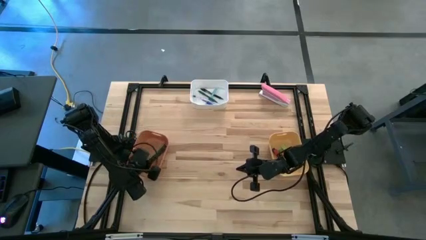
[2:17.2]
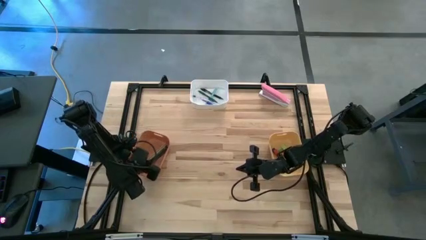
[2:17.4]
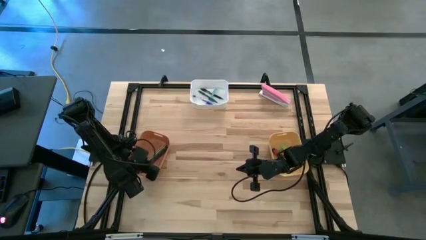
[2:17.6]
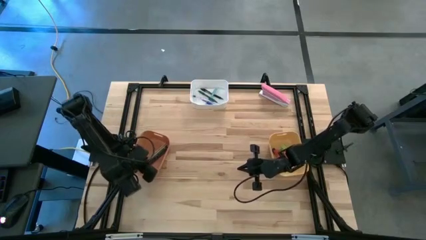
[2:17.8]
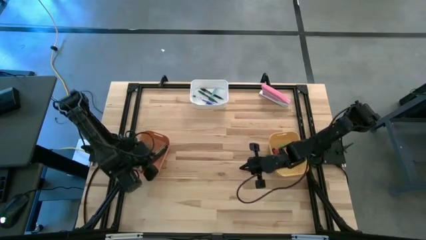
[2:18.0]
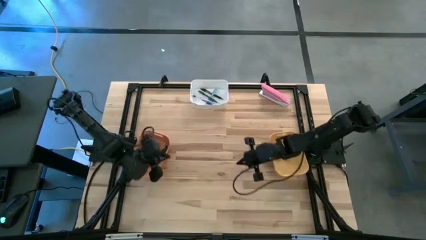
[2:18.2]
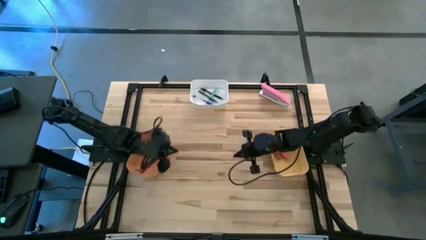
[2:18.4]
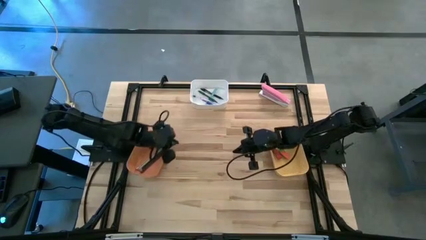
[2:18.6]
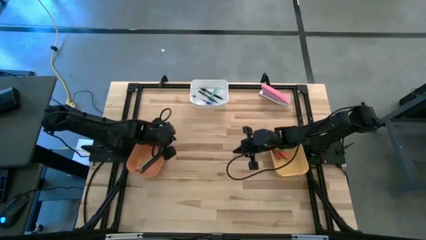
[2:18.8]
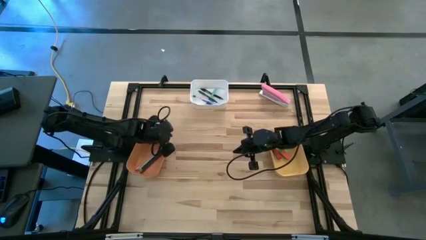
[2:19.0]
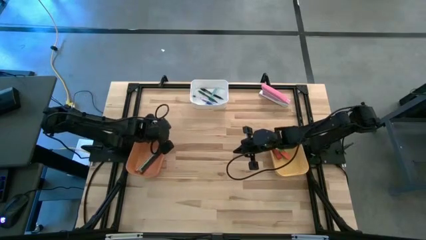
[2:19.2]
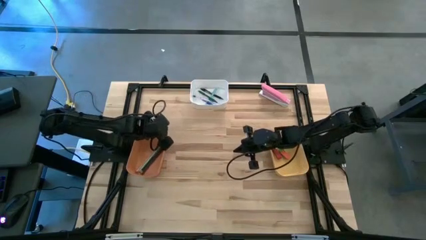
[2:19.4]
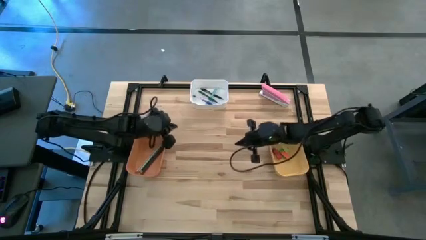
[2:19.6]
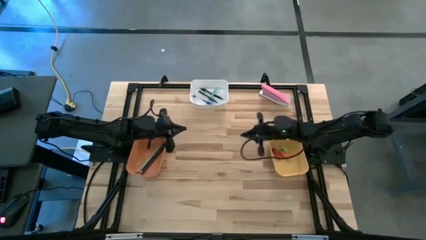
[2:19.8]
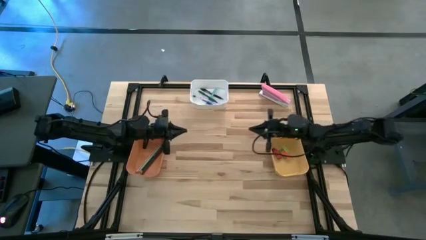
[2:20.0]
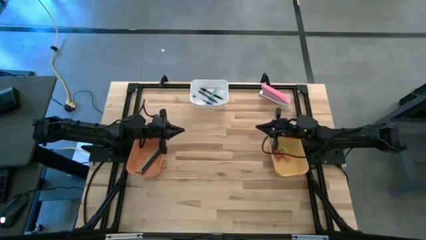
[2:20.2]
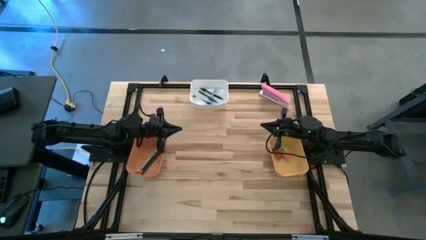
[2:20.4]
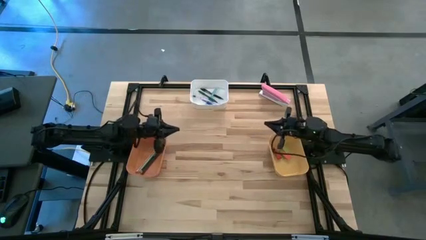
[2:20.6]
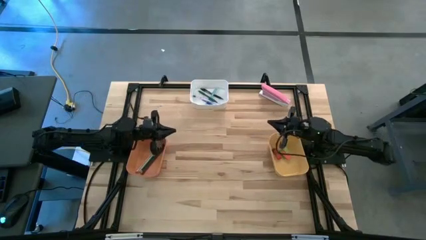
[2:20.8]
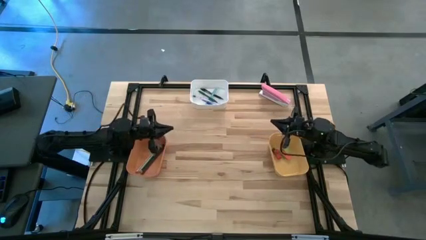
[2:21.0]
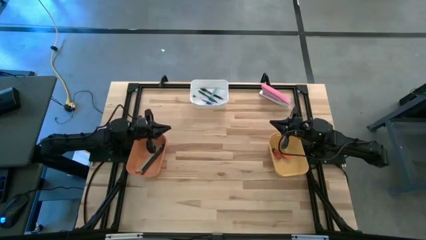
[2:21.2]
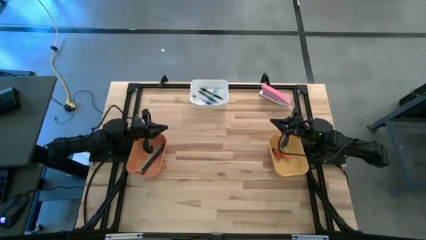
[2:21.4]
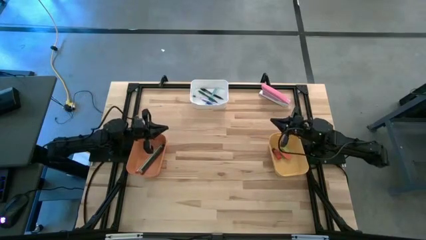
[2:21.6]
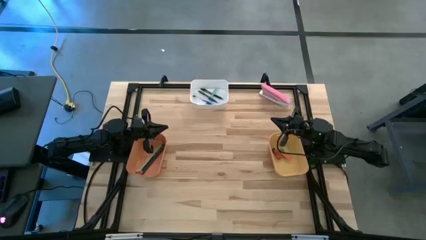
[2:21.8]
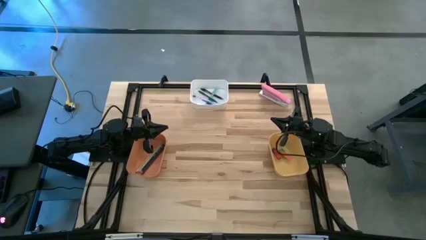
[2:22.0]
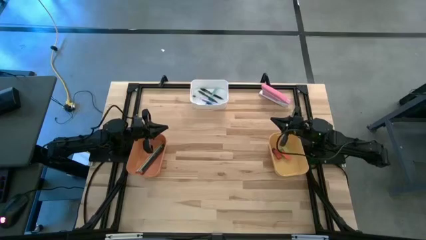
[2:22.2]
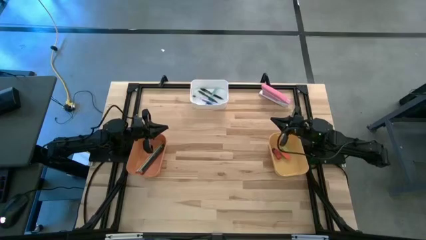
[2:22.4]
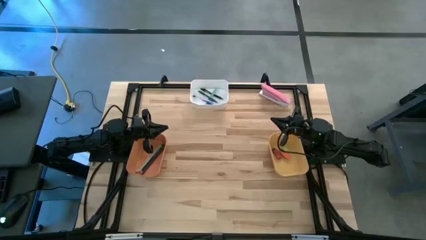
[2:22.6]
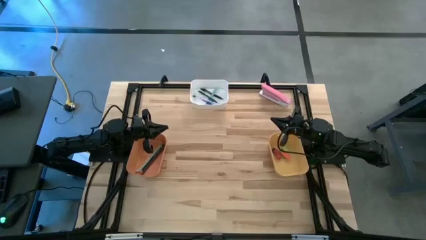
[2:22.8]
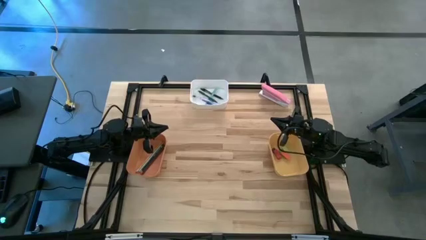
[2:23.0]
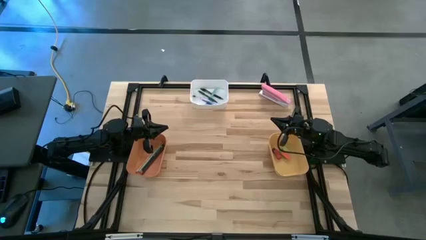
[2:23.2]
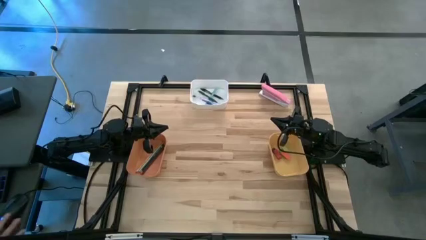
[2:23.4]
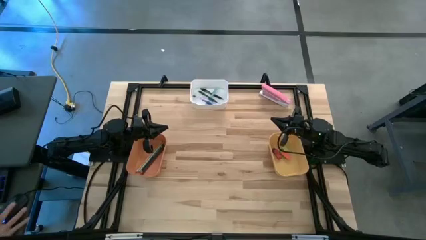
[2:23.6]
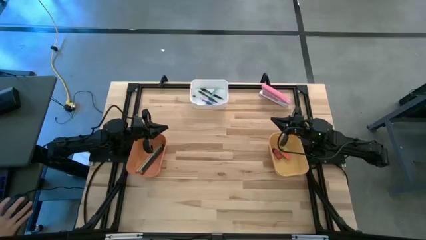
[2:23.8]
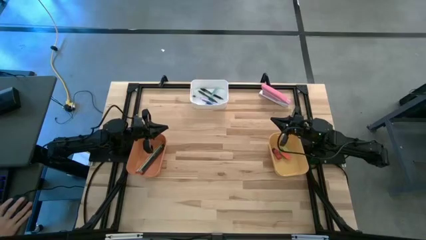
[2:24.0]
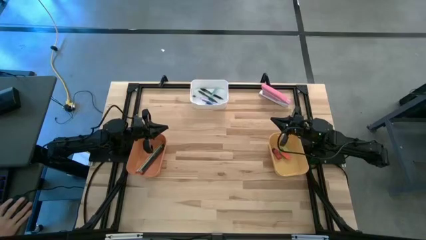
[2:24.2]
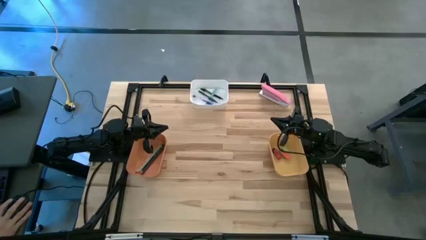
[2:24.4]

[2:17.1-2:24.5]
Task: Sort crayons/erasers/pens/pencils in bins
Return to Home Position

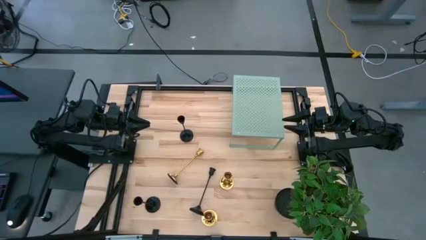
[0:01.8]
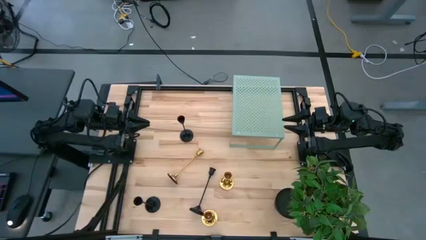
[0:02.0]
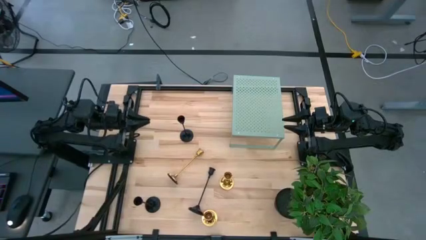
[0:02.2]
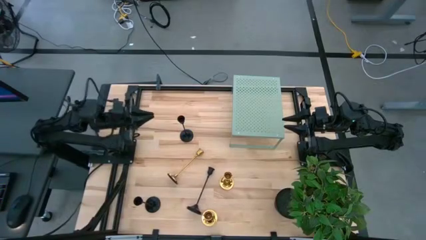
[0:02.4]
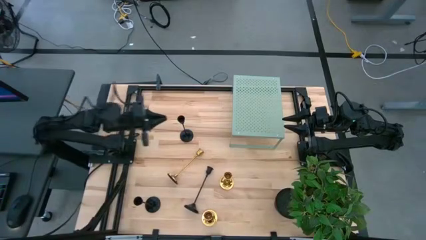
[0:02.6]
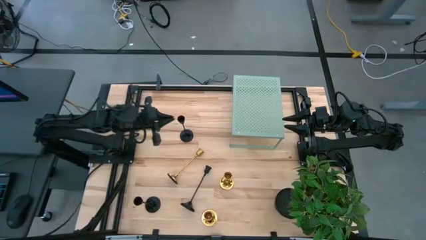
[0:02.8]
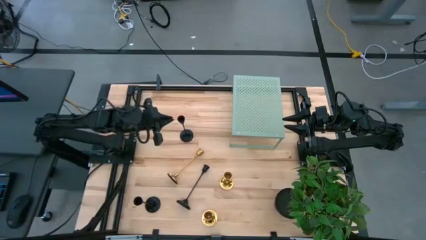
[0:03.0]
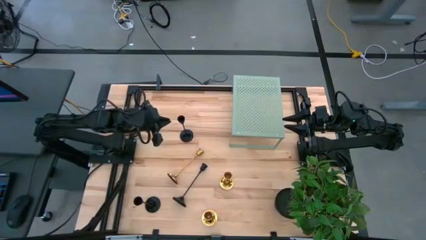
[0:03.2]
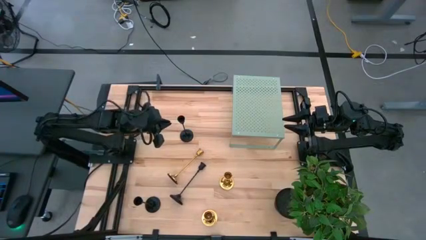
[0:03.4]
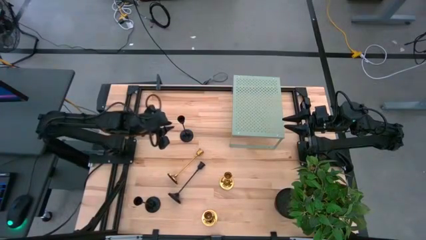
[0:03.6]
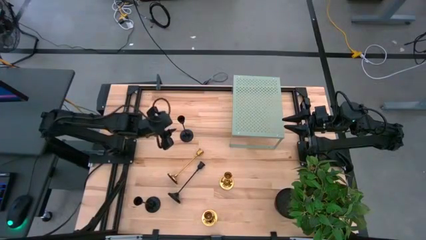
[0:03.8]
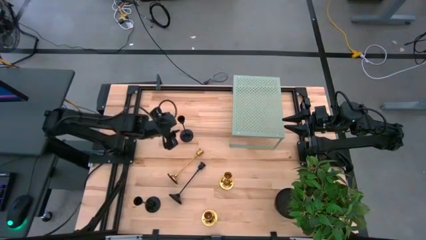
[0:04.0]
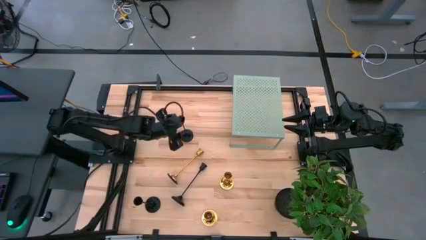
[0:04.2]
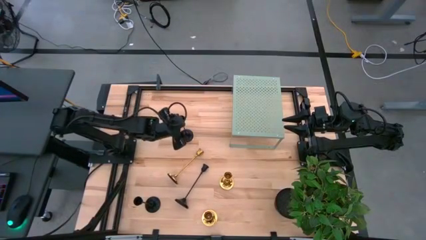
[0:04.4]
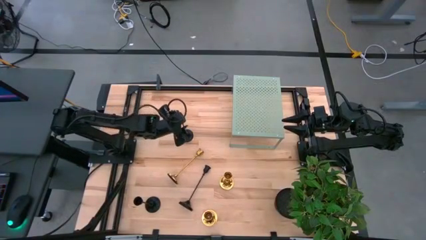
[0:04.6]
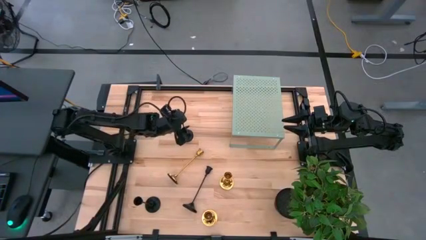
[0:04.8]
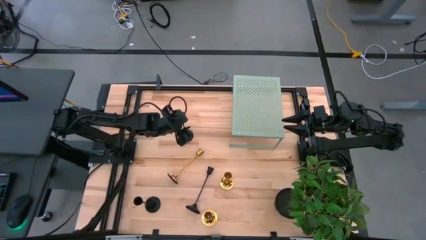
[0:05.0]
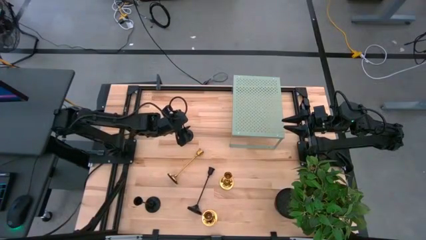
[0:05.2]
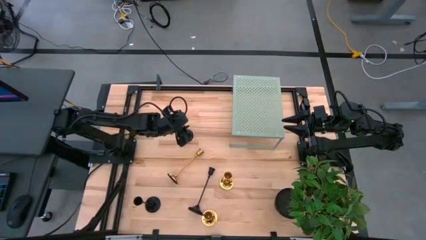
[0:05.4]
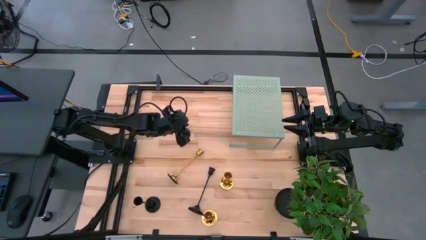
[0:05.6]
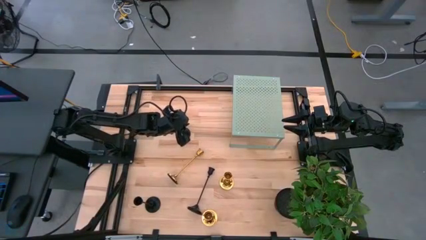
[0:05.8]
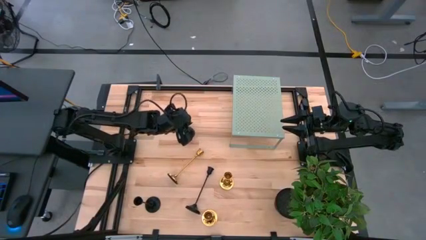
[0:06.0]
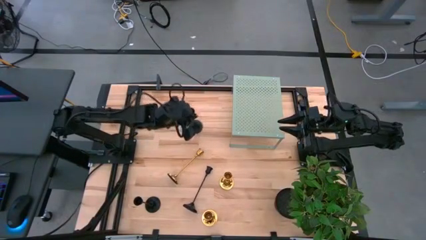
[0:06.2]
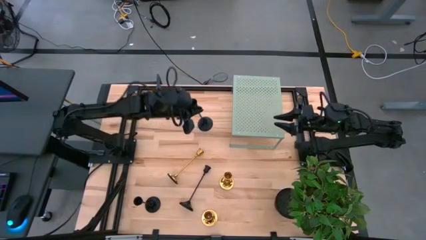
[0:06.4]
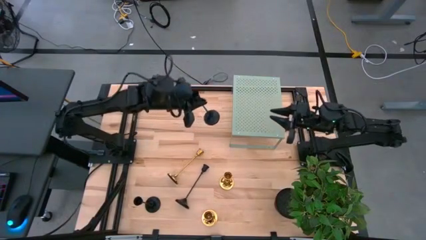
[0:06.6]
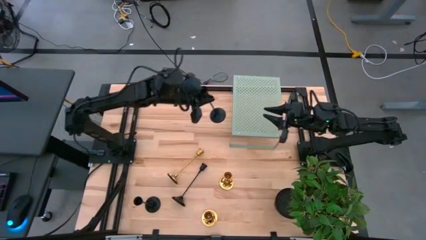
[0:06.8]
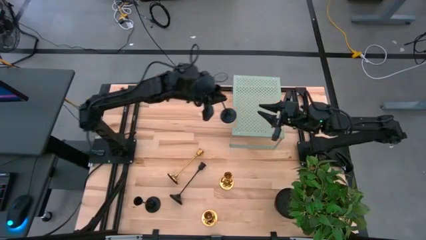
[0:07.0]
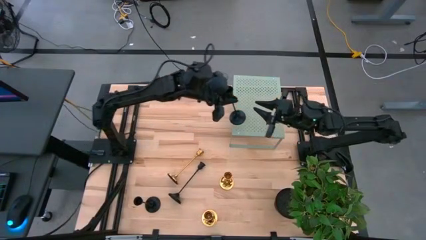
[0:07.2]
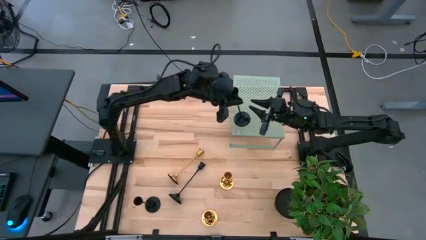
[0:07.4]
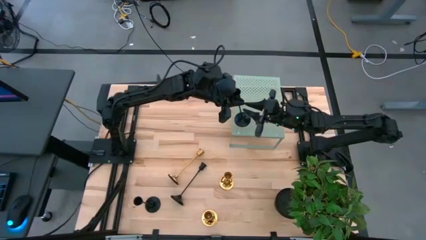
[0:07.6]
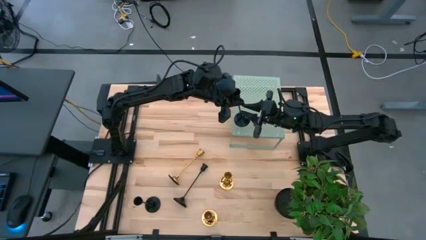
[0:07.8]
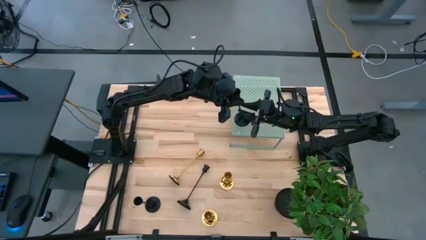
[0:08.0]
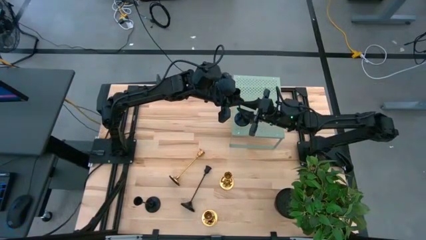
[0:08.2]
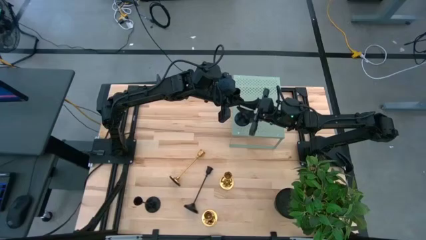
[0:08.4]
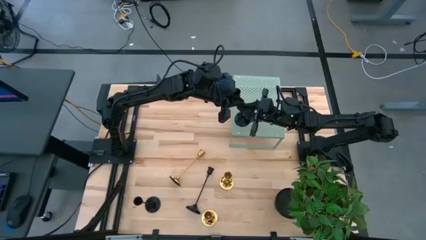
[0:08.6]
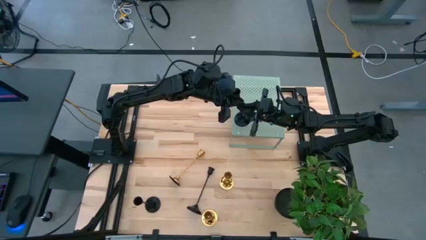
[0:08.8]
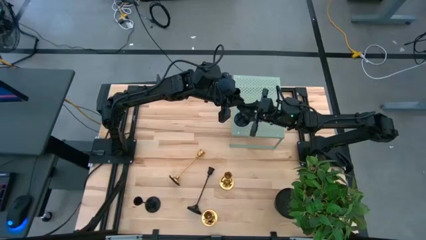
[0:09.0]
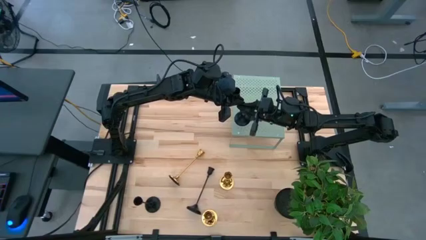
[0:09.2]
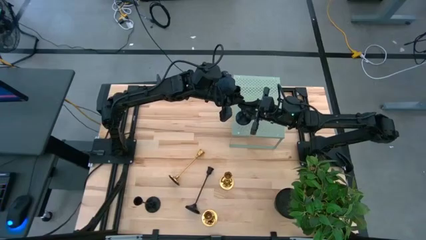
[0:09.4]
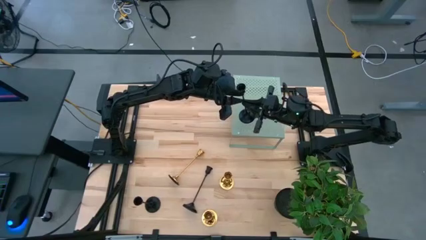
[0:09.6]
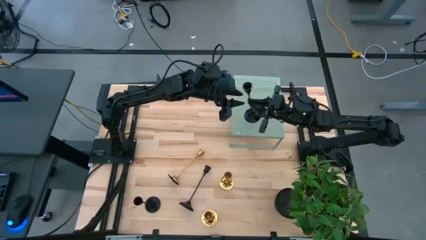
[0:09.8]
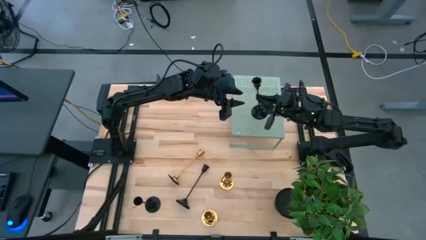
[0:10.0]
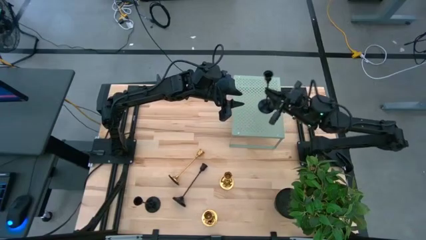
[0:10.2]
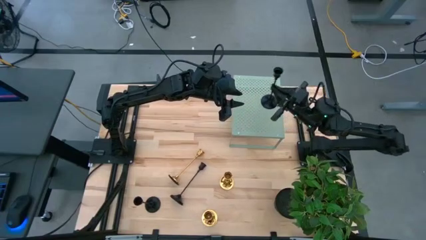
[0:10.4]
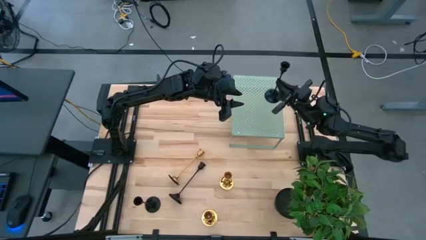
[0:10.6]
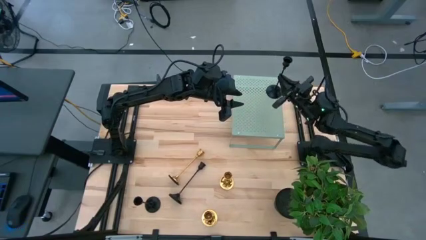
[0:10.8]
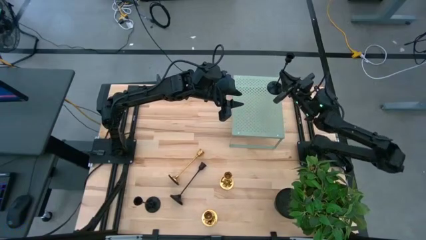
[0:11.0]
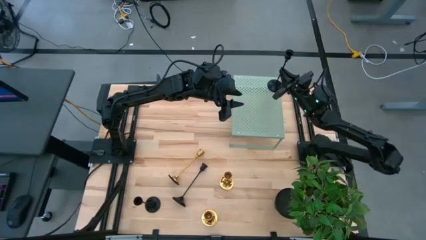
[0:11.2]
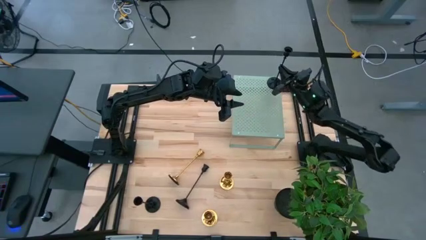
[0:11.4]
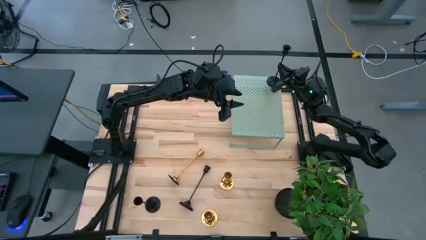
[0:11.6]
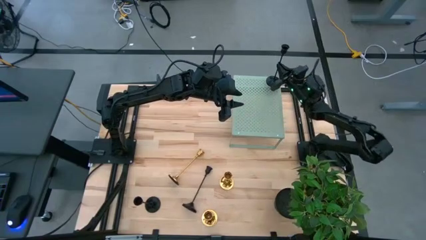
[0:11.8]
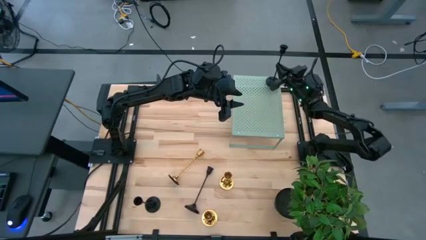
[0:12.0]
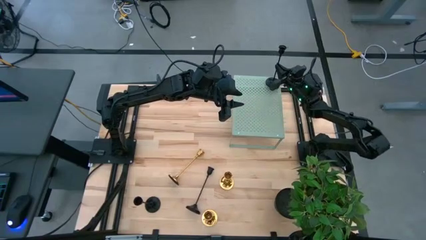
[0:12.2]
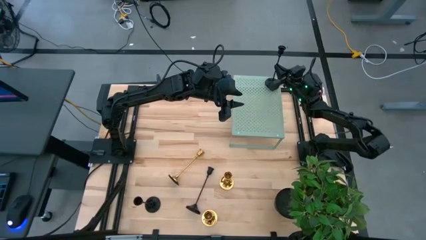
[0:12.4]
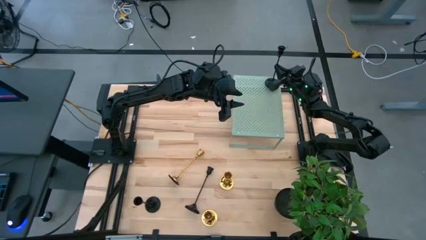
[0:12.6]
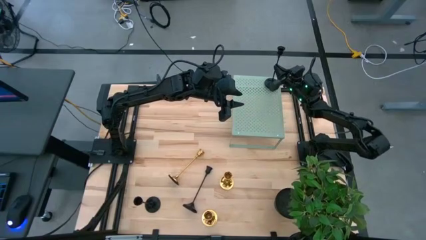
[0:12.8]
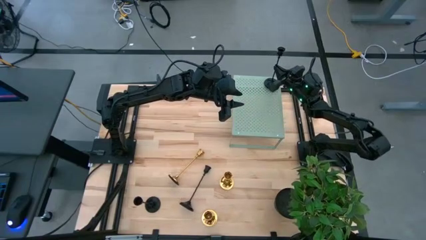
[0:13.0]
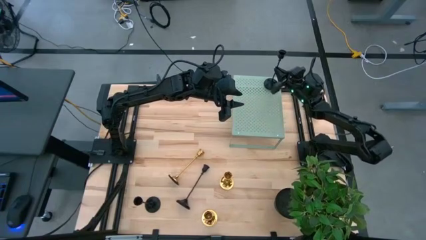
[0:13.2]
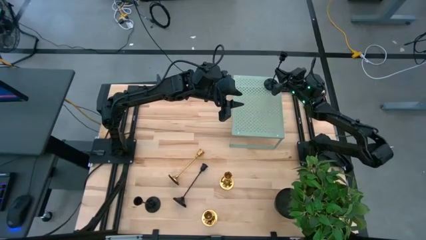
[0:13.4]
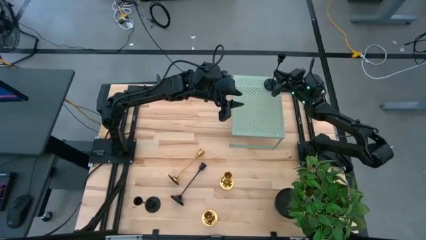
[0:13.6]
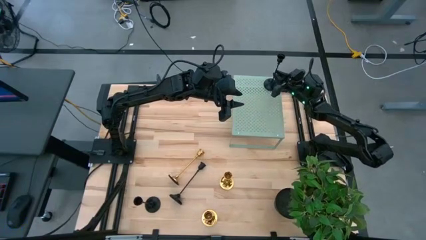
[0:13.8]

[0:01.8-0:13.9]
Task: Pick & Place candle stick holders
Put the top black candle holder on the shelf
